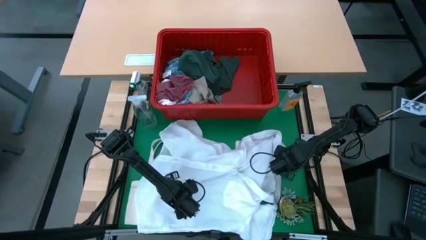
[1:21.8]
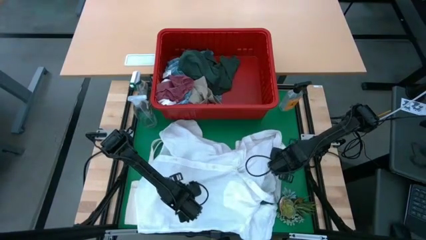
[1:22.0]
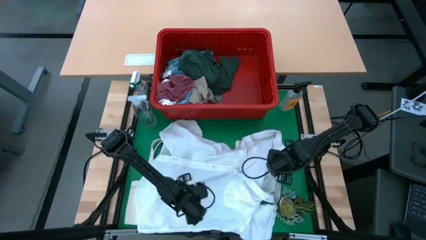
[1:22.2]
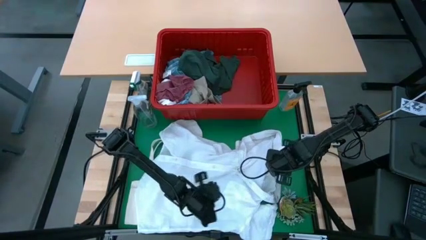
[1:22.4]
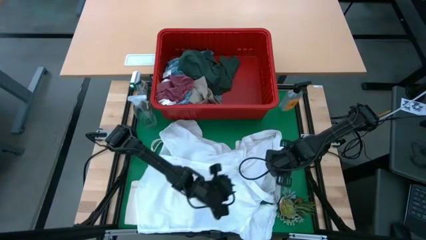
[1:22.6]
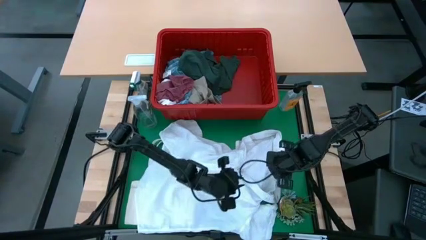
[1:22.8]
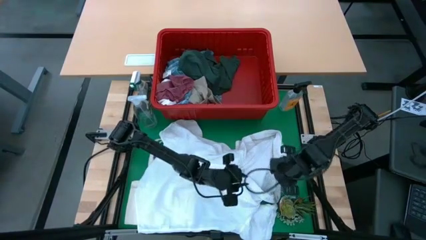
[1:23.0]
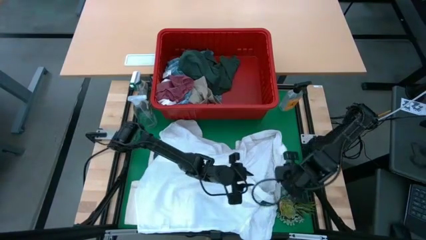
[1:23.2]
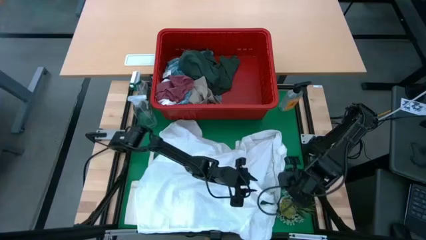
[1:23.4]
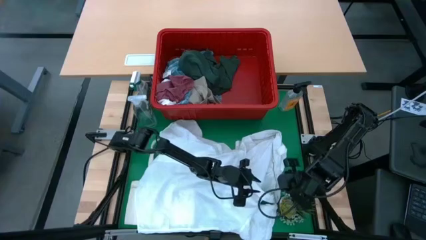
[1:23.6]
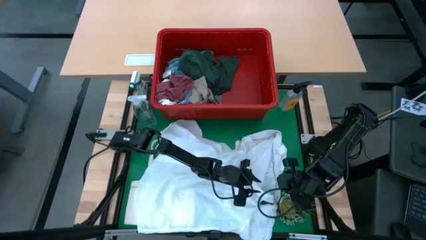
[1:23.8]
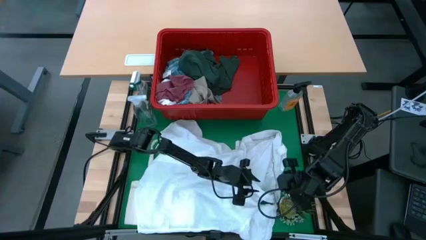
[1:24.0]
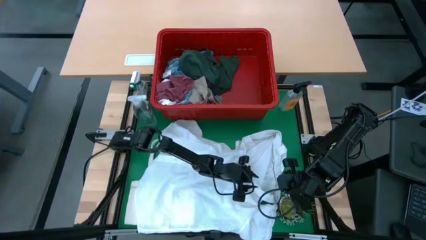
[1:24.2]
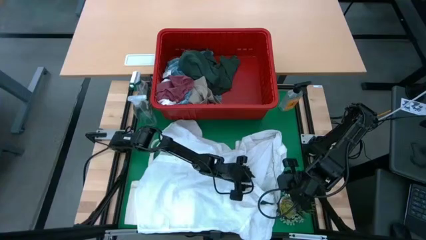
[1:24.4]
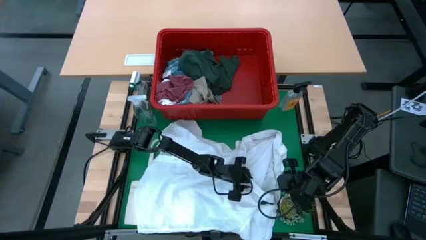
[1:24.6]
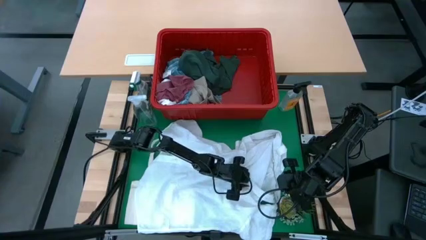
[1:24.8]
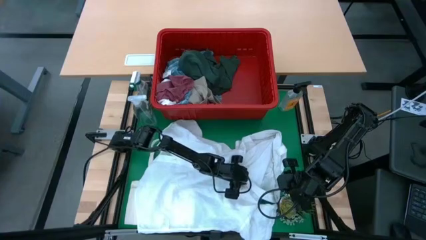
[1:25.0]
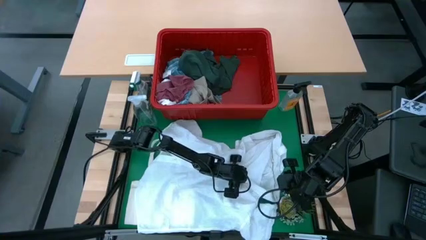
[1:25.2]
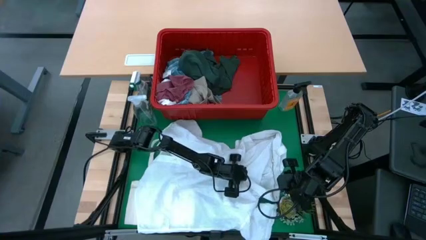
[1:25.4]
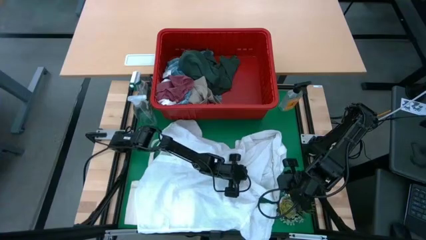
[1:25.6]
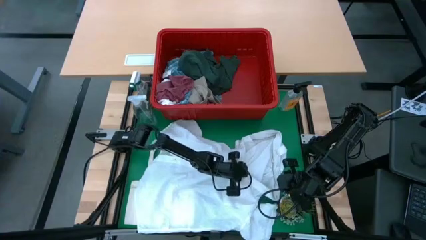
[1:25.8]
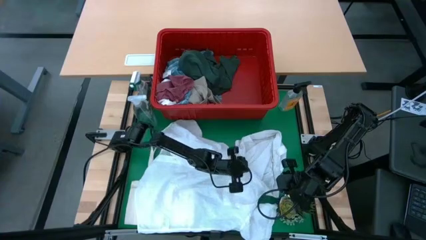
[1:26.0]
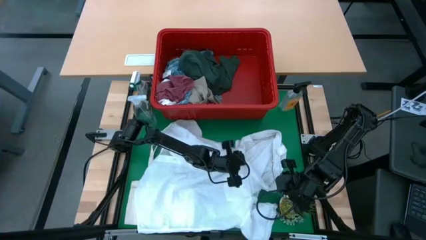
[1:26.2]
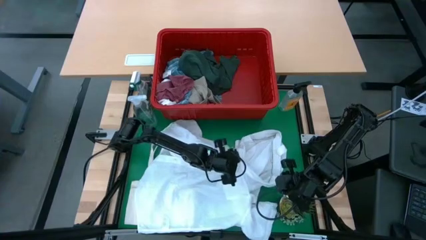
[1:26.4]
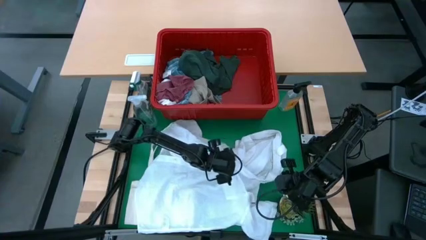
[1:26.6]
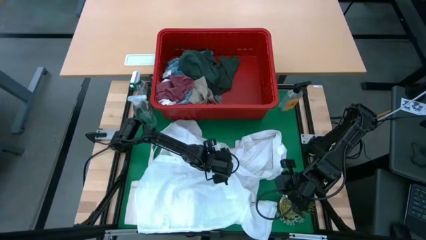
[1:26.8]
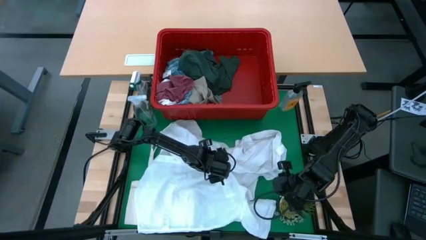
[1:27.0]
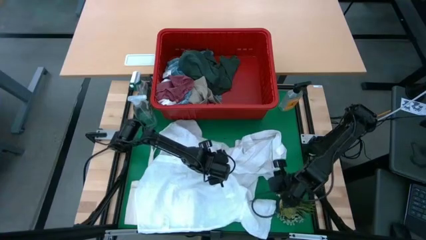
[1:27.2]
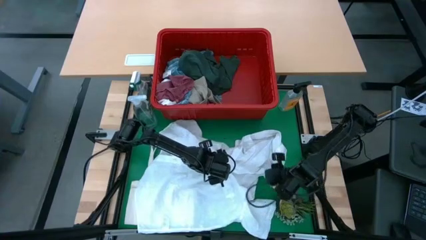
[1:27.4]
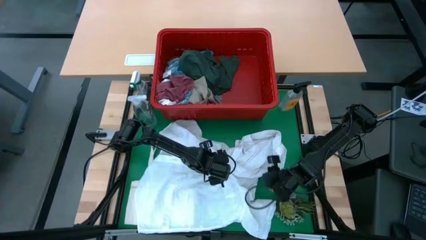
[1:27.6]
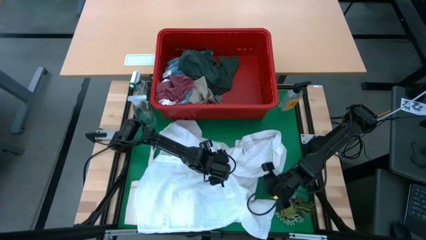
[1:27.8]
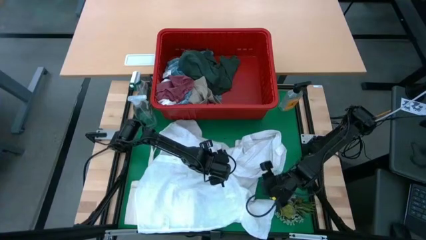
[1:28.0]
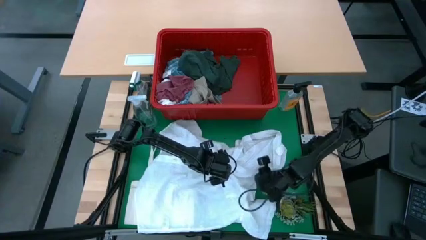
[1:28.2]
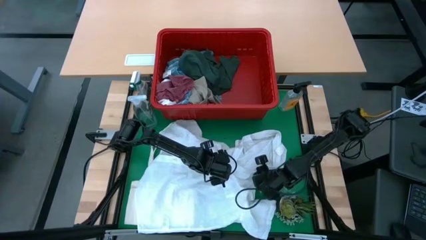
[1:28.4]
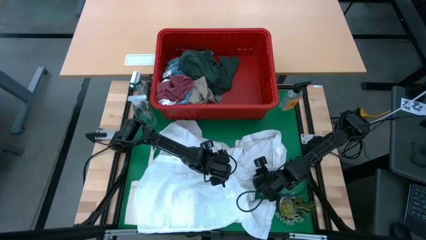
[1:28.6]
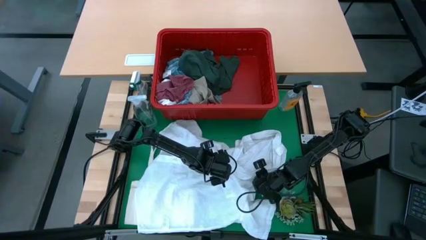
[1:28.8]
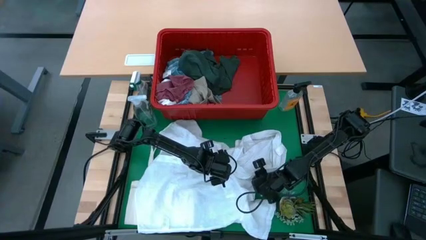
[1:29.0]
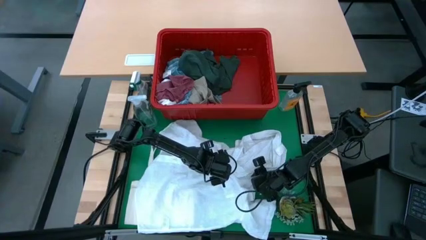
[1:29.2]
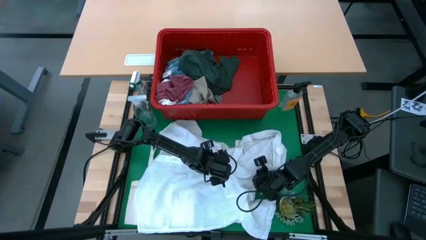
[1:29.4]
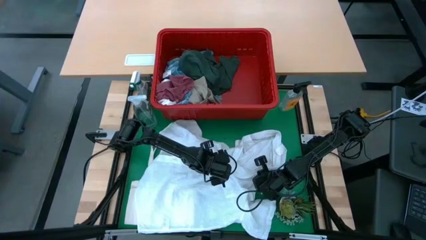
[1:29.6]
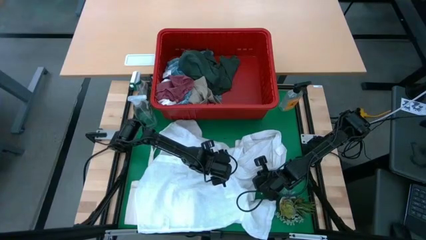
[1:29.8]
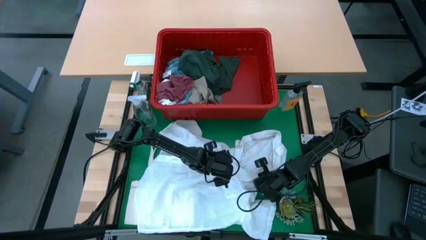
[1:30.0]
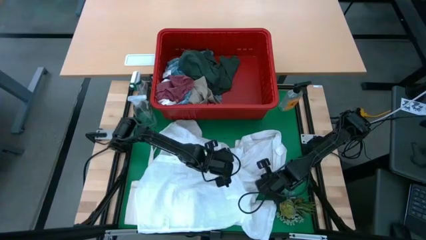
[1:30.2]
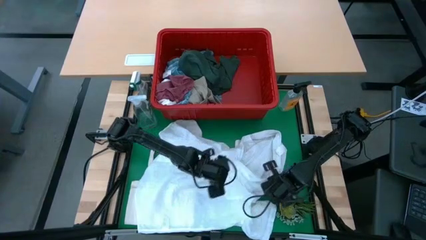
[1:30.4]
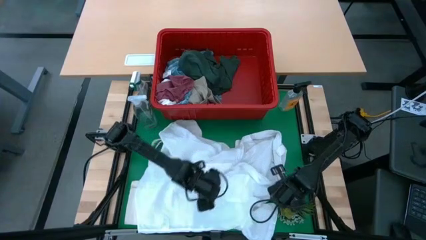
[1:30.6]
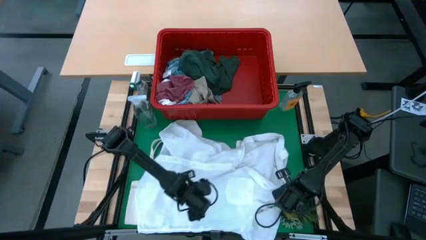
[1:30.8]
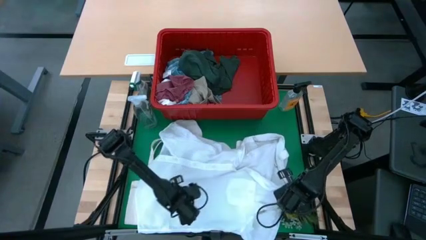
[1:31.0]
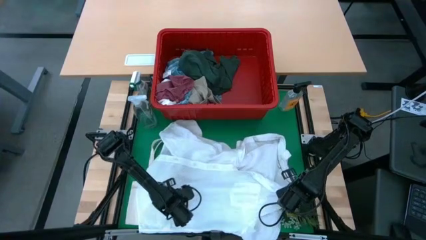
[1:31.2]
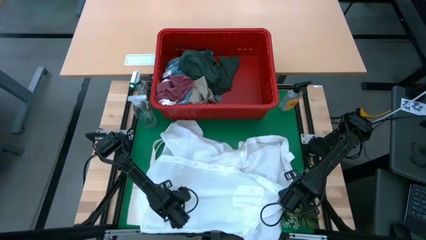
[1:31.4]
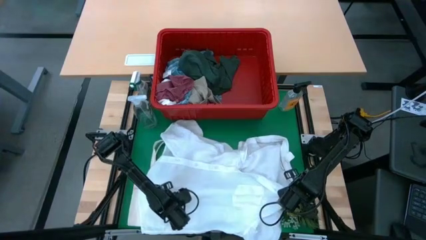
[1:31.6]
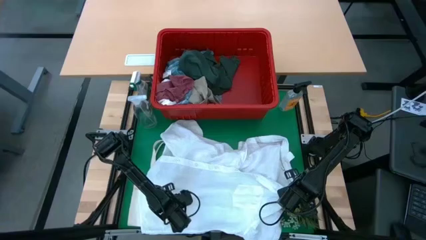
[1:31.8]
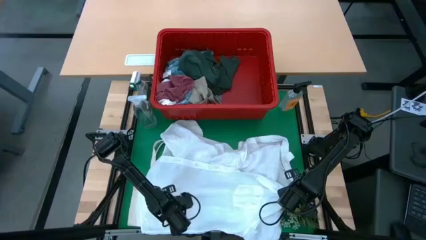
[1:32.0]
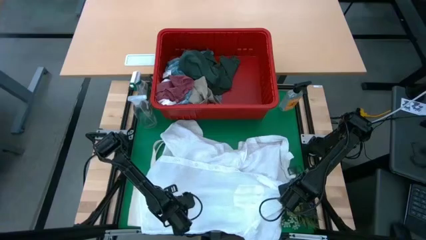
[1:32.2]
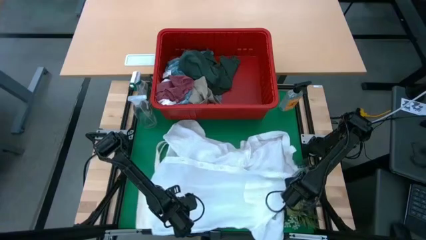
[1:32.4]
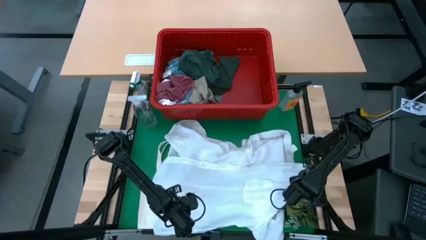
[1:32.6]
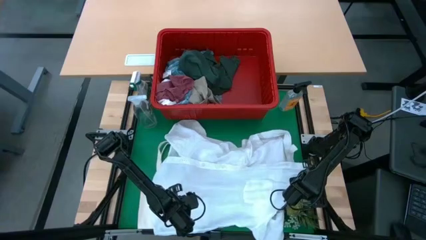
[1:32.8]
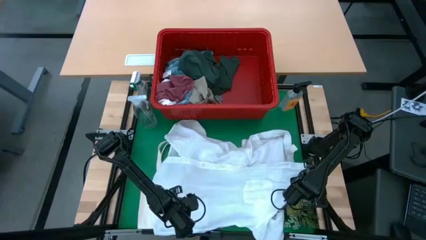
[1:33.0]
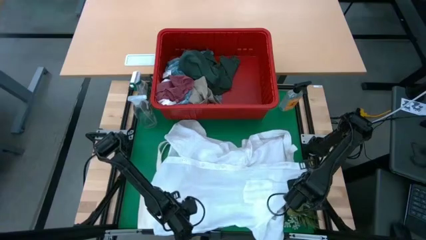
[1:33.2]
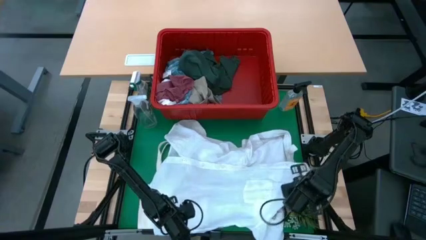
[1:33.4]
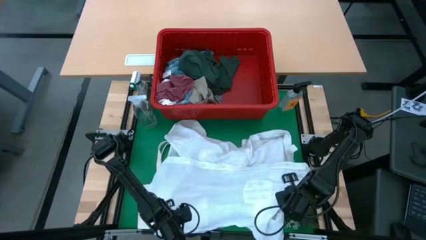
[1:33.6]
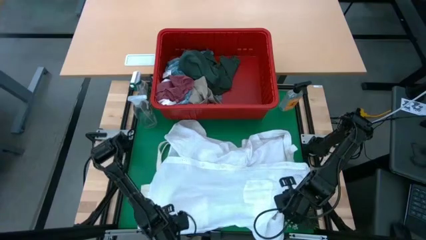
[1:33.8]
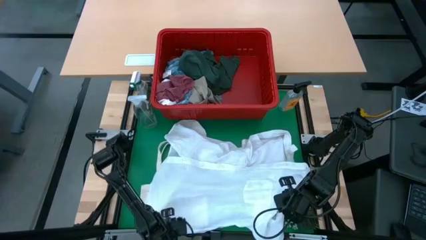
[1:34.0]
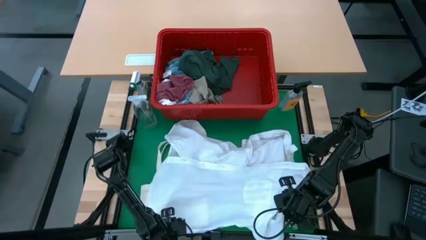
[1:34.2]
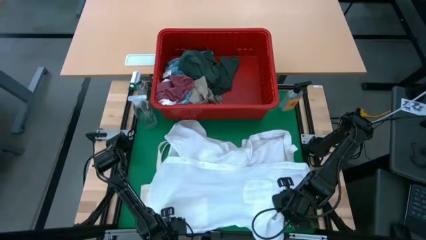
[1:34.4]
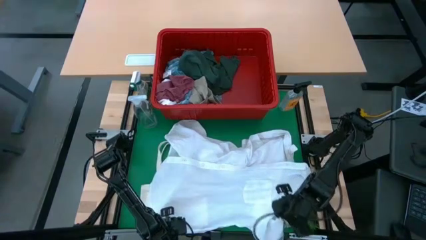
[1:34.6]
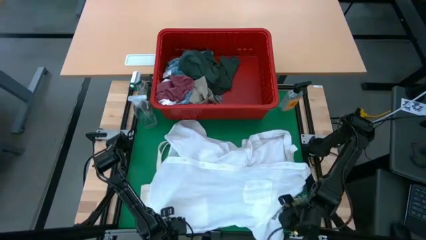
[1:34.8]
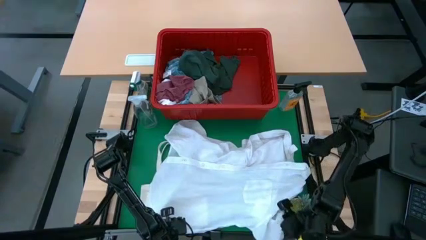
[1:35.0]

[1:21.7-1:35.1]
Task: Fold Laundry from Bin
Fold the white polo shirt
